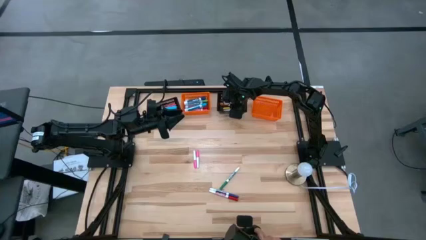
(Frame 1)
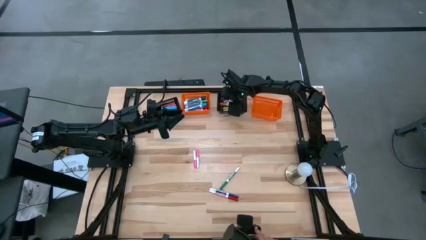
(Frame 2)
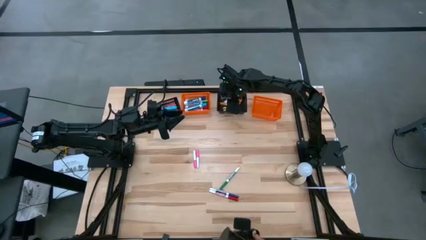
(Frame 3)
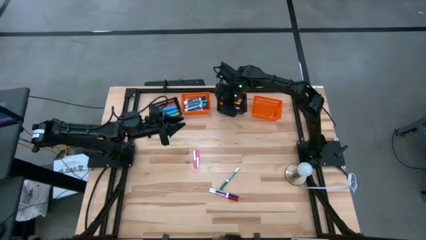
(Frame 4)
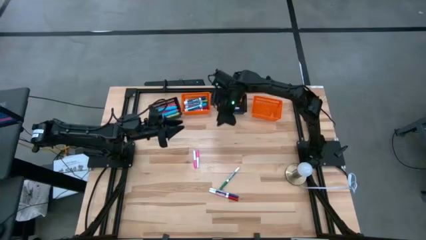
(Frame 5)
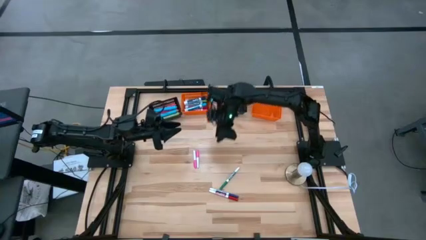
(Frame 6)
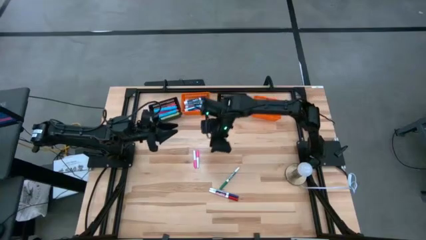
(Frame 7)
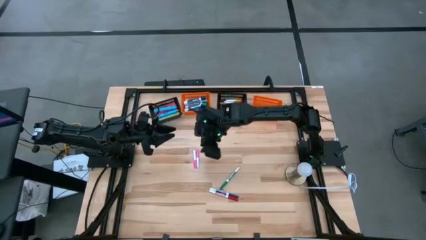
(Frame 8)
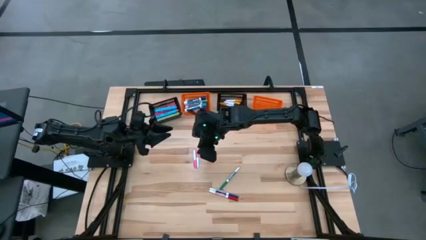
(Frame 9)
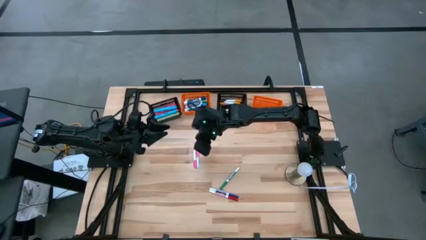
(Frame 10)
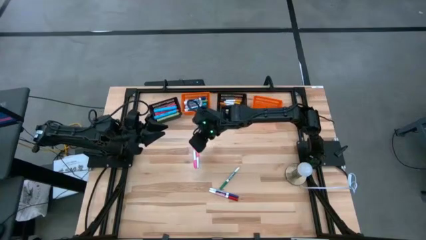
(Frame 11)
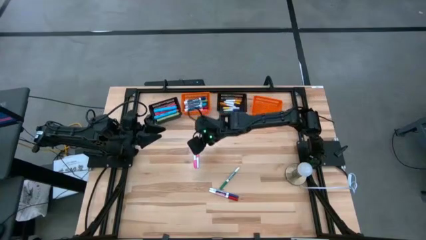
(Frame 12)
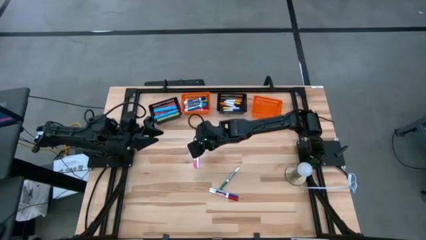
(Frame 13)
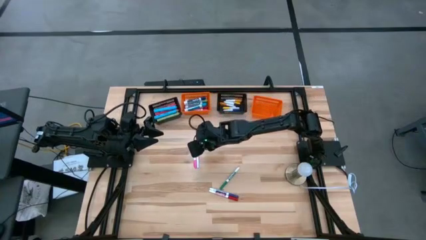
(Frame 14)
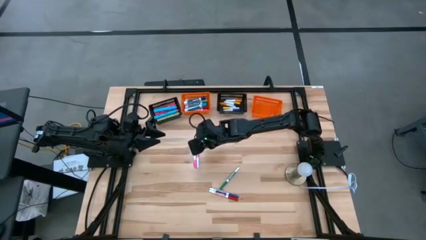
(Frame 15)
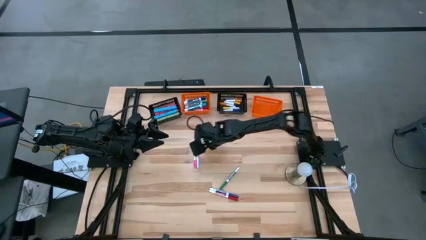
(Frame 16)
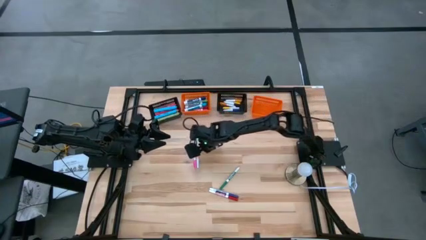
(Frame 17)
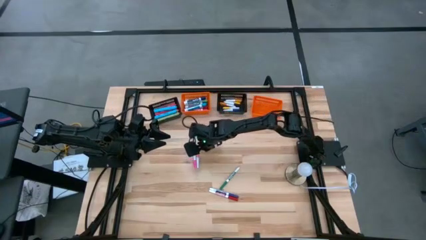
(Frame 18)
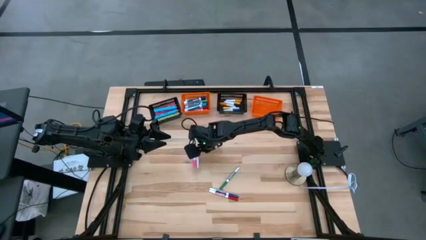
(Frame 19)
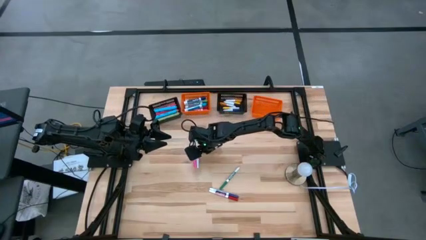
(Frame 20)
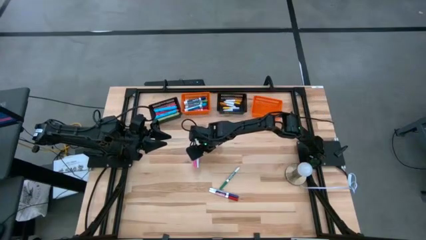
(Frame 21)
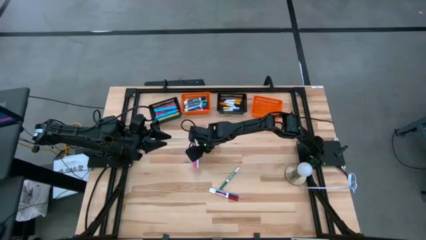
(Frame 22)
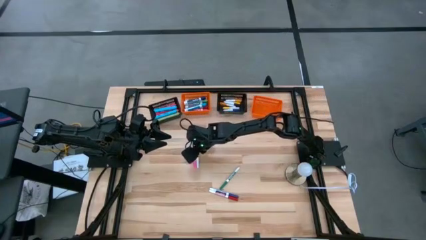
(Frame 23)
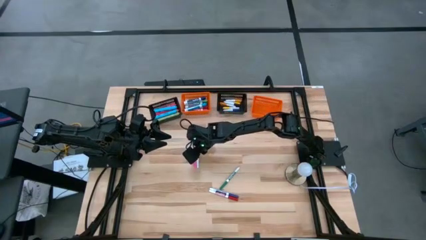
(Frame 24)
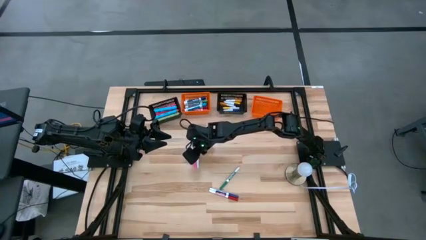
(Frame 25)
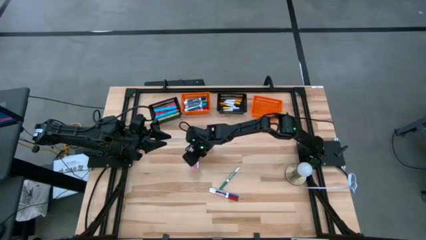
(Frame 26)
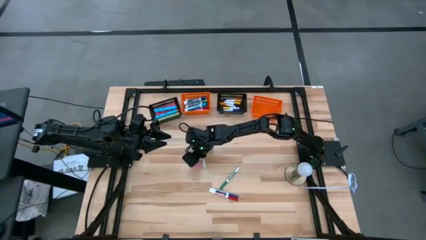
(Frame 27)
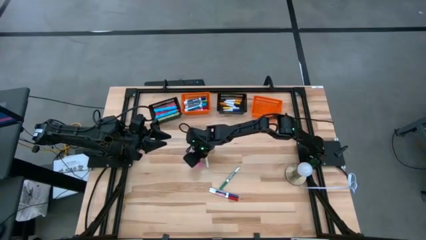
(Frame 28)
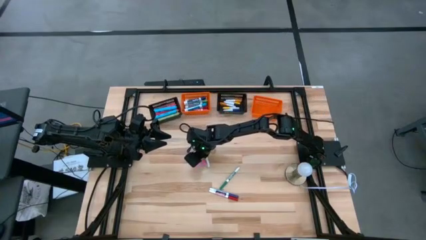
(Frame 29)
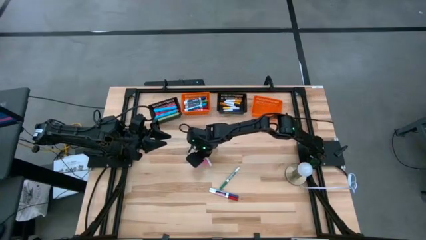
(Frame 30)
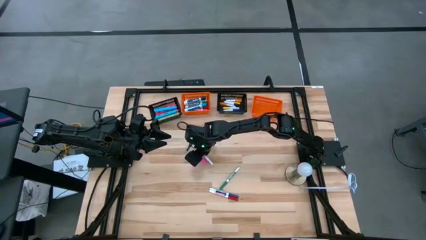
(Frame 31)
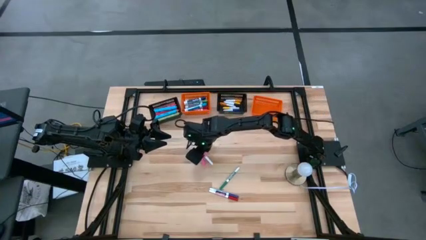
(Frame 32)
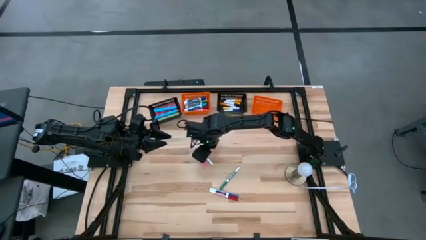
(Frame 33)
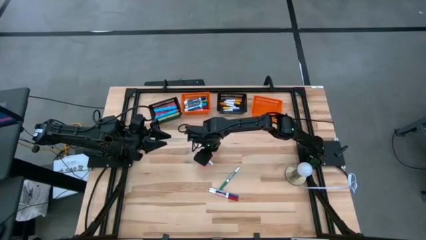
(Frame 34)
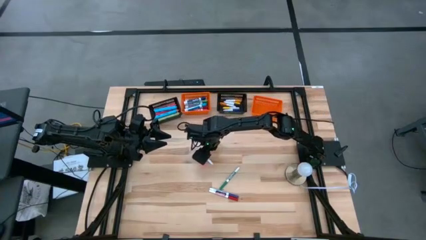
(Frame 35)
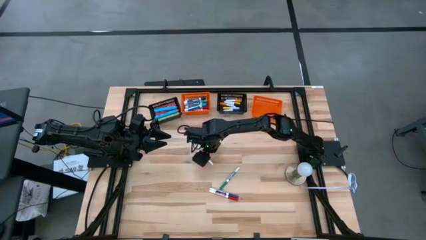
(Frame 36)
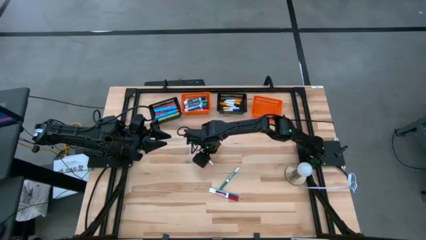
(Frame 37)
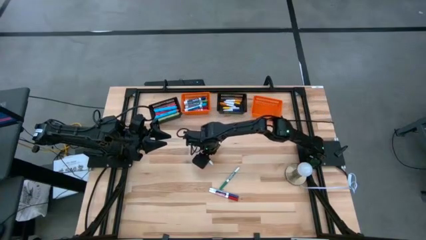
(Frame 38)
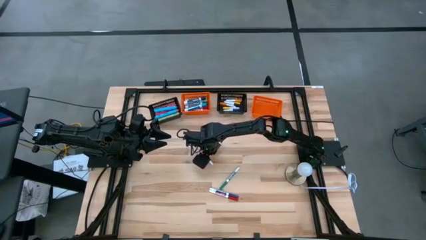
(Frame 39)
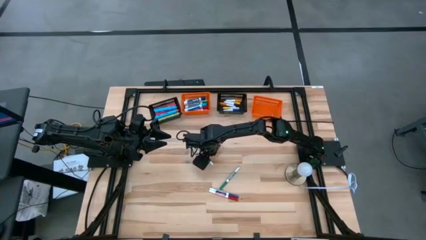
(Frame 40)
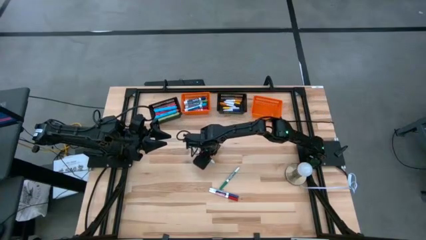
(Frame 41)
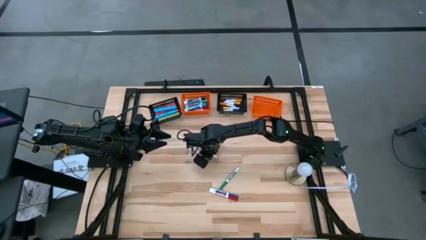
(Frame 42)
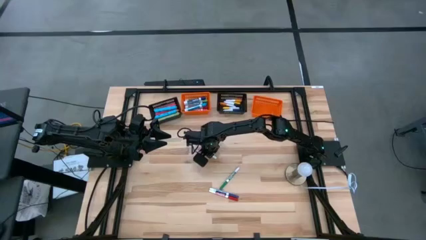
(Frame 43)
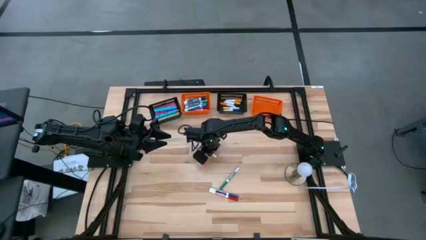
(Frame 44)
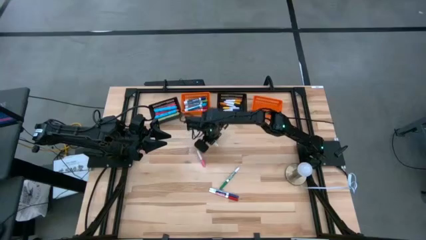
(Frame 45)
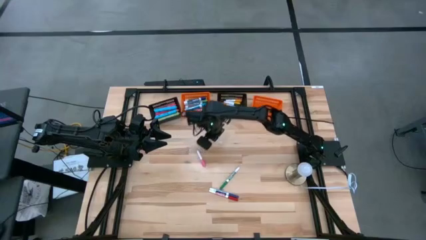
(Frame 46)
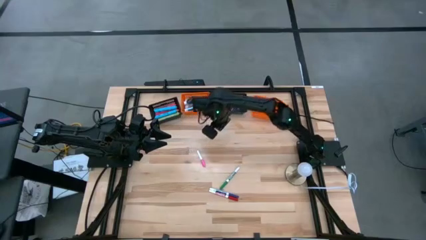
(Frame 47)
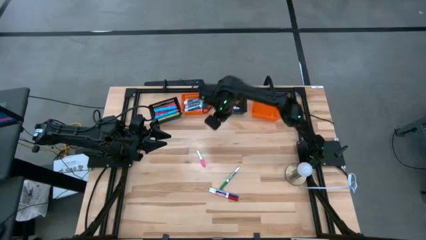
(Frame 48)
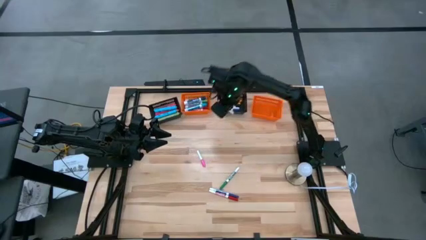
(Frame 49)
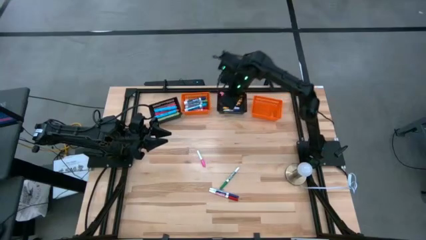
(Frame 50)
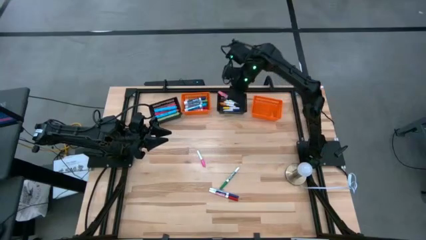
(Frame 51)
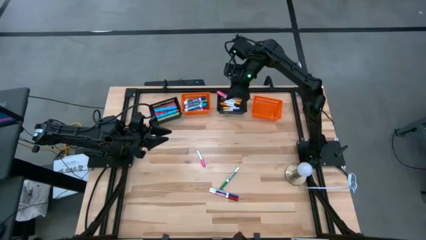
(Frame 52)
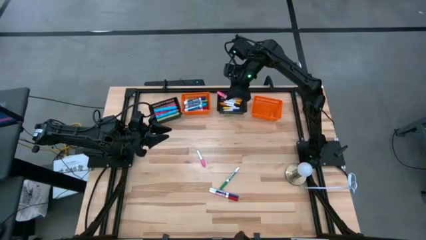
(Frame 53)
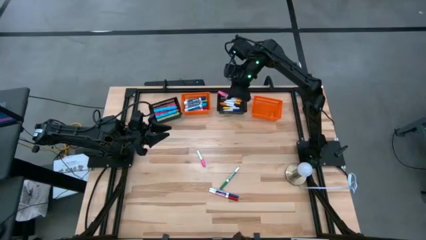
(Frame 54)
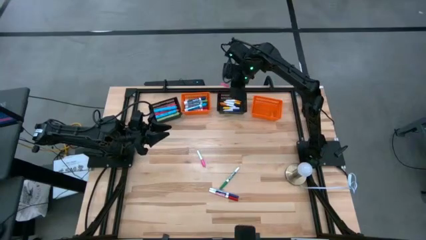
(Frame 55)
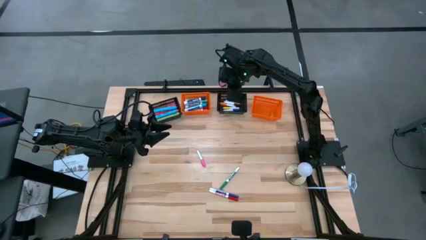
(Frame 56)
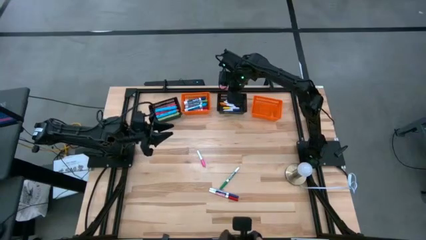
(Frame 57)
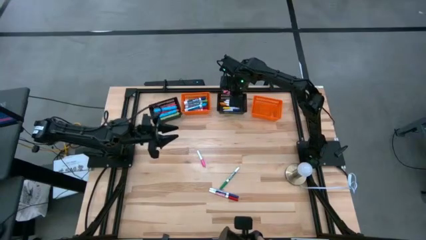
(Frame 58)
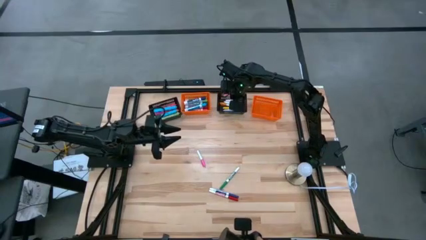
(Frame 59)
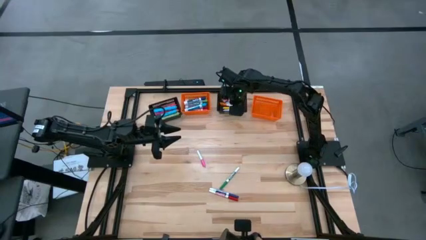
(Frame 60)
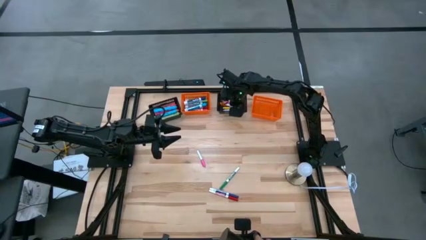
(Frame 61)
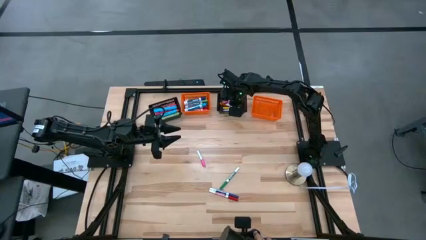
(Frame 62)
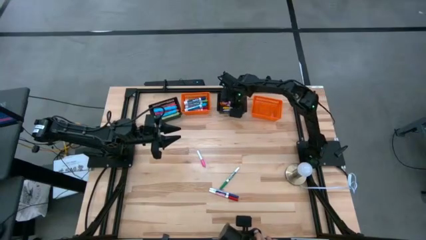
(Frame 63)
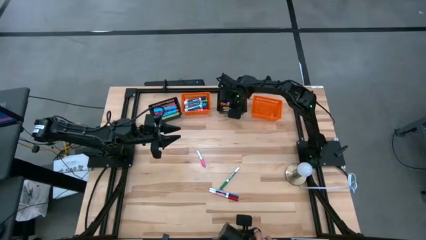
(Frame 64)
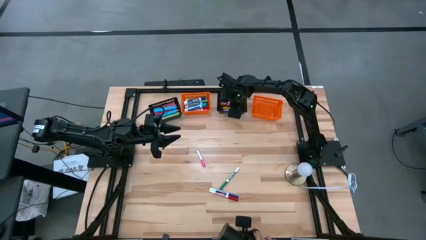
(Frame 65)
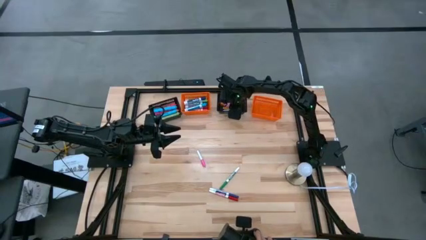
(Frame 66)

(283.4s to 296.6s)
Task: Pick & Place Markers
Put the right pink mini highlighter pen into the right black bin

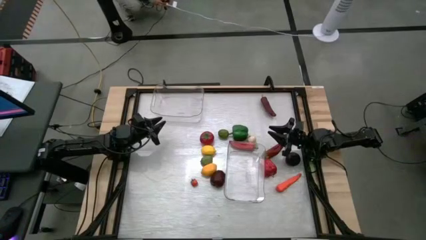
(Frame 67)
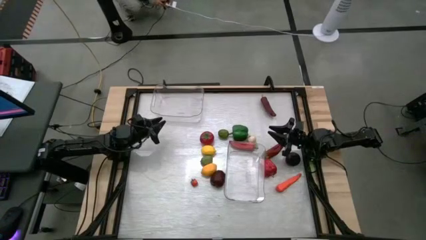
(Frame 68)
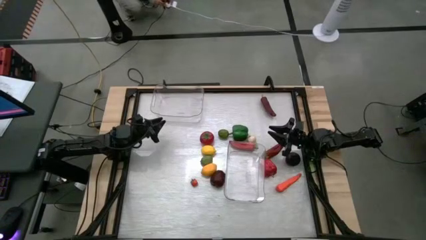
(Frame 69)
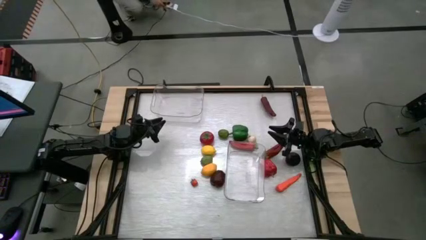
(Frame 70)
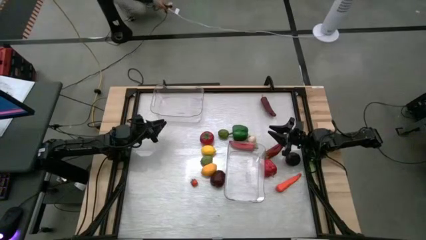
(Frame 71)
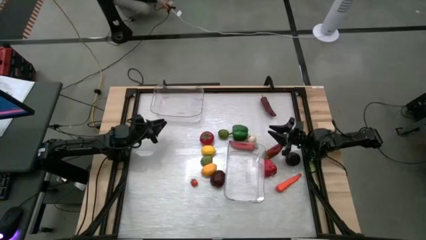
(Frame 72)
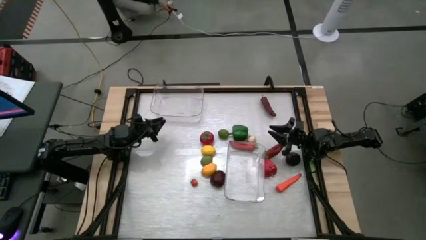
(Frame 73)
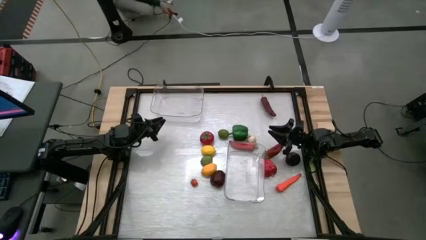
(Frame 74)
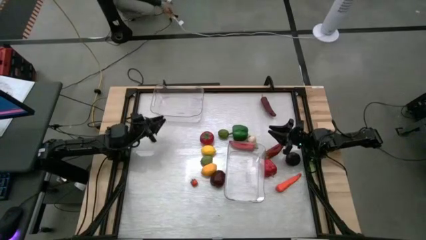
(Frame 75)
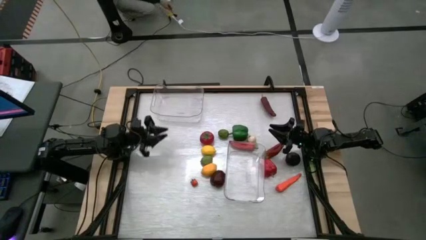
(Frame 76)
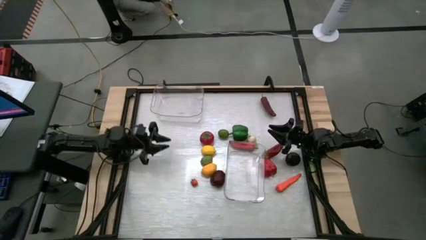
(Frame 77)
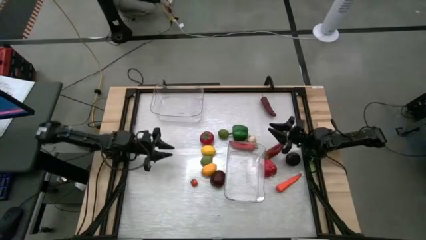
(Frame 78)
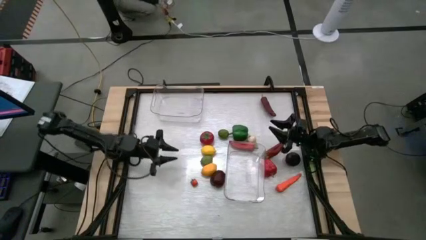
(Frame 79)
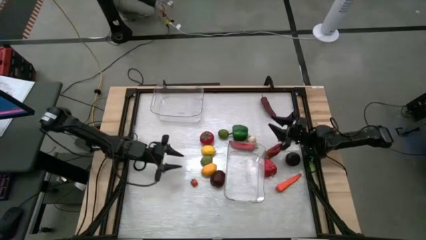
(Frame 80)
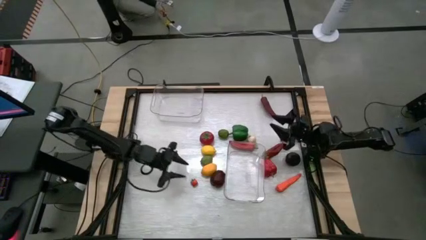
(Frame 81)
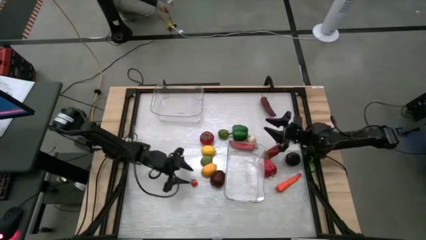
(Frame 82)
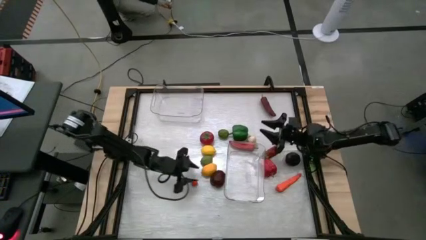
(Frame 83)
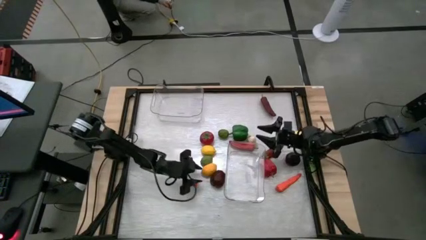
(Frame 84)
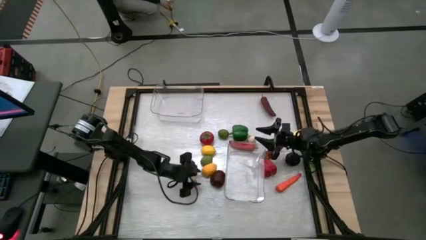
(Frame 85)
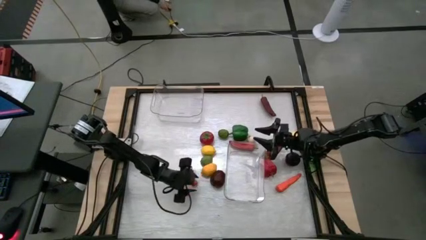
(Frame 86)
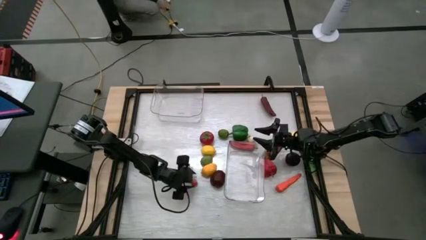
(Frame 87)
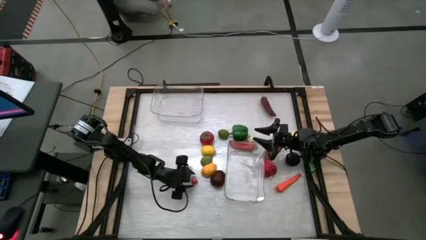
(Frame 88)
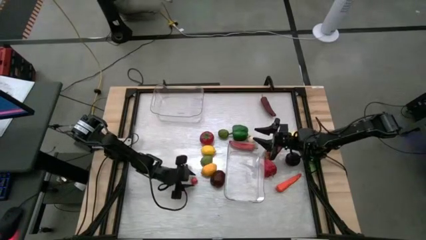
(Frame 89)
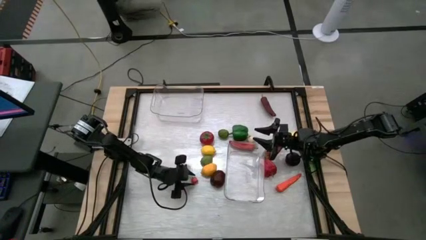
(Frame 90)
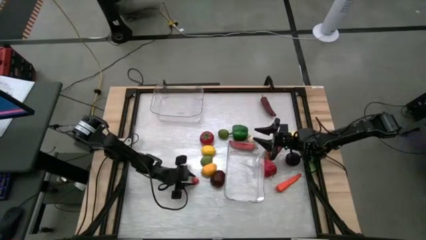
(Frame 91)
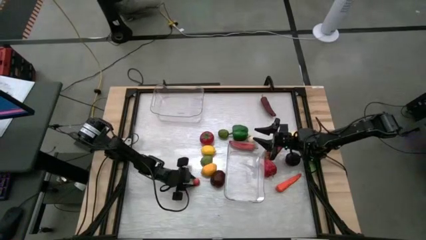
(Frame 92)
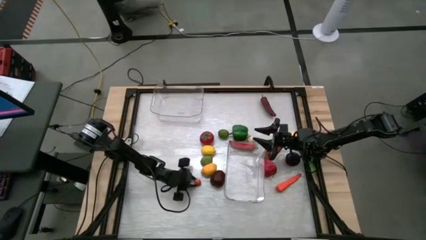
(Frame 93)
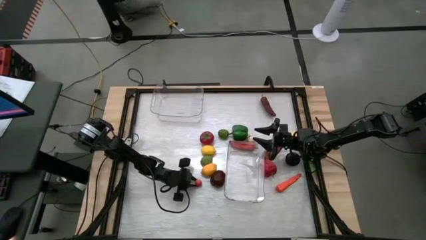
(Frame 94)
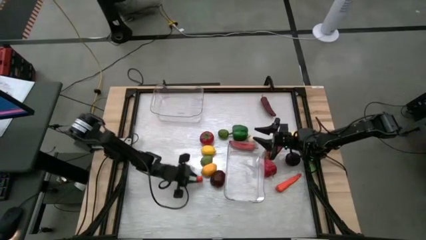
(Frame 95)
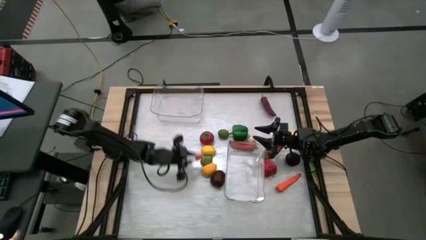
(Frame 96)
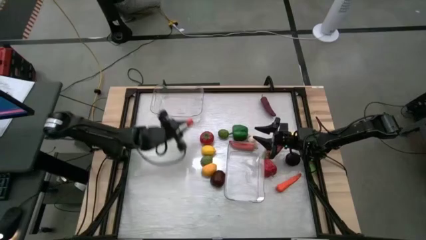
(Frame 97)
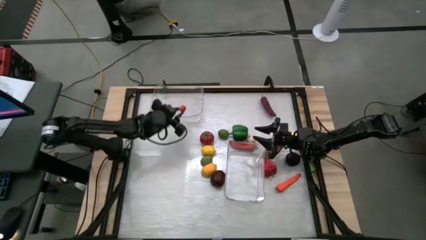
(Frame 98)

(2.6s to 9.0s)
Task: Sort produce into baskets
Put the bottom orange tomato into the top transparent bin
